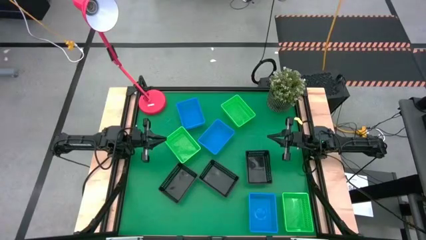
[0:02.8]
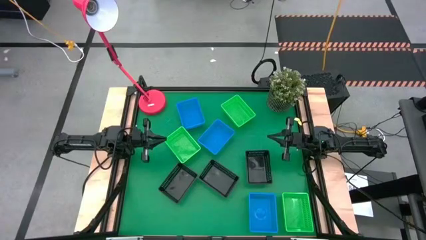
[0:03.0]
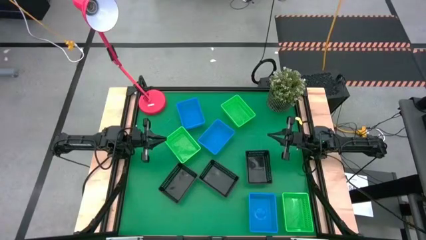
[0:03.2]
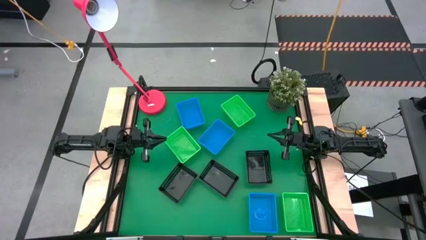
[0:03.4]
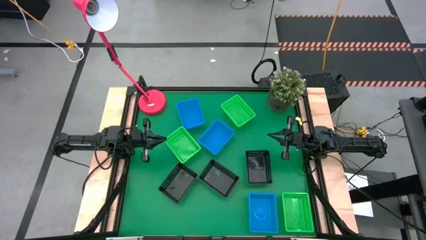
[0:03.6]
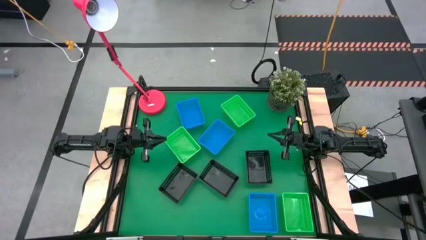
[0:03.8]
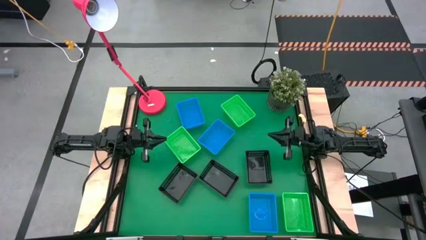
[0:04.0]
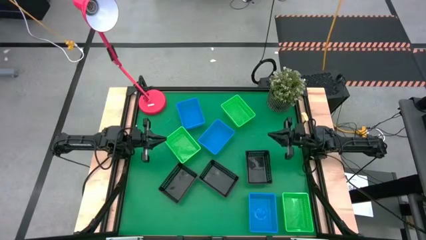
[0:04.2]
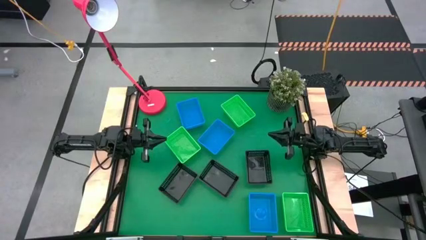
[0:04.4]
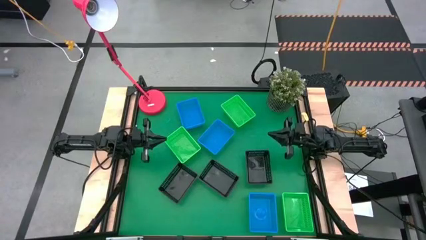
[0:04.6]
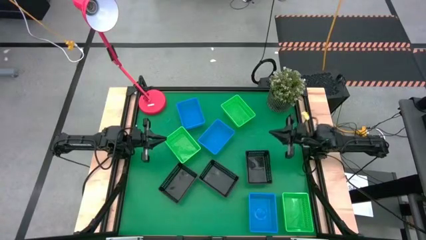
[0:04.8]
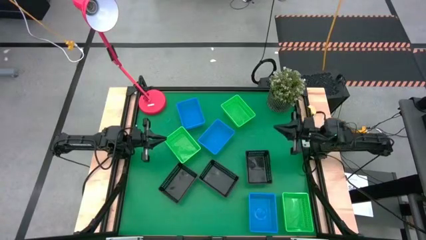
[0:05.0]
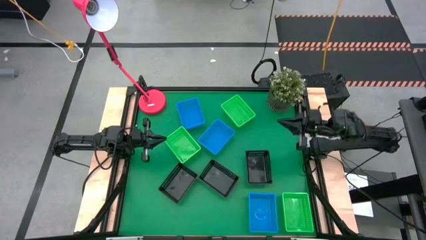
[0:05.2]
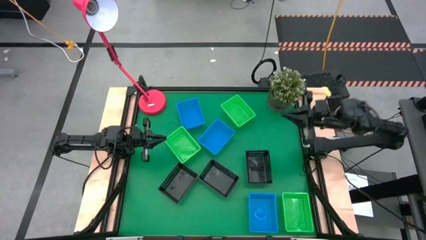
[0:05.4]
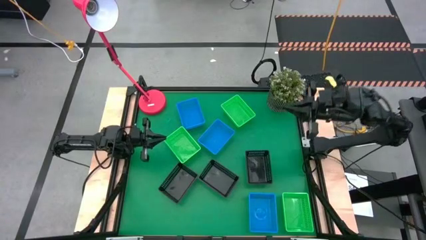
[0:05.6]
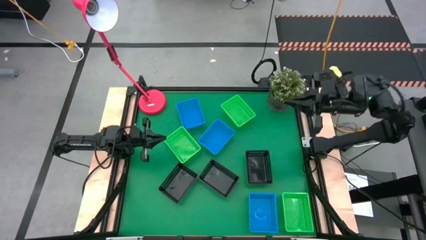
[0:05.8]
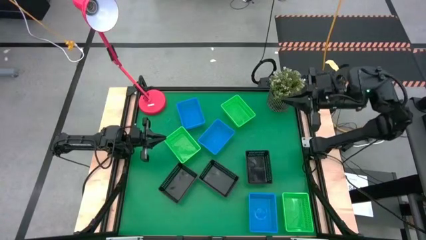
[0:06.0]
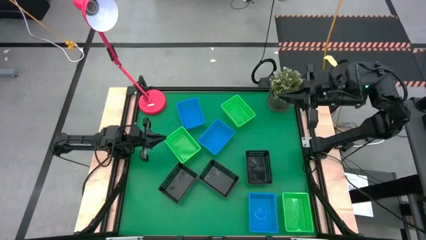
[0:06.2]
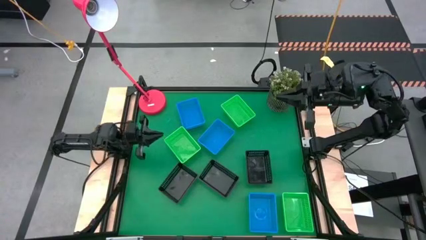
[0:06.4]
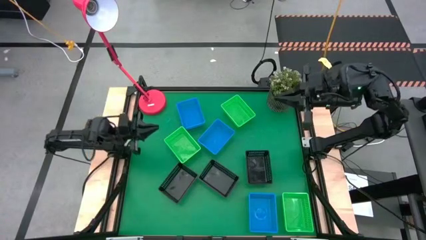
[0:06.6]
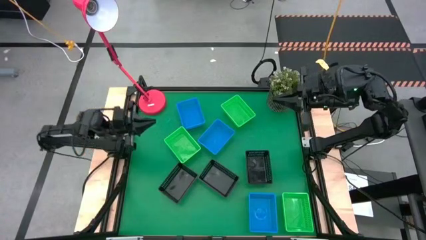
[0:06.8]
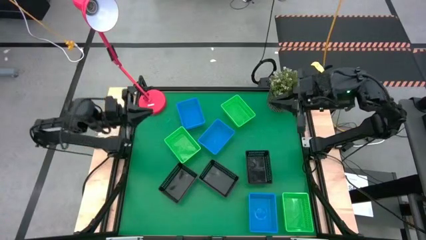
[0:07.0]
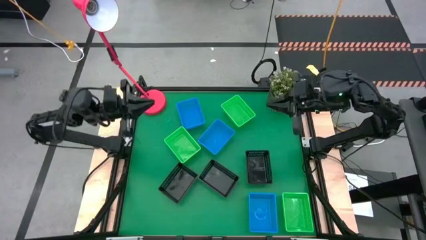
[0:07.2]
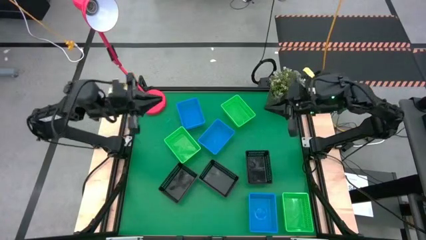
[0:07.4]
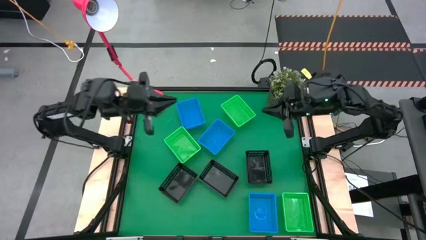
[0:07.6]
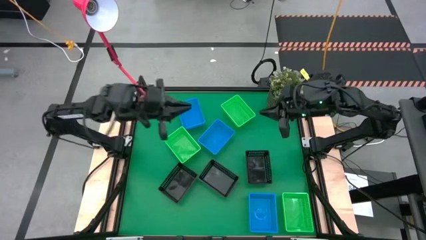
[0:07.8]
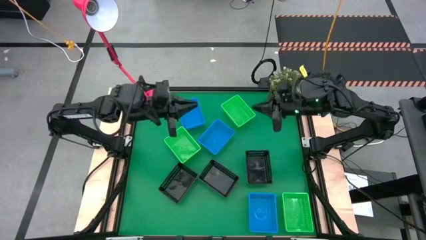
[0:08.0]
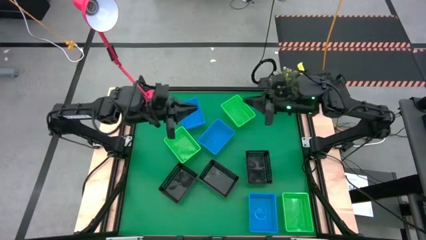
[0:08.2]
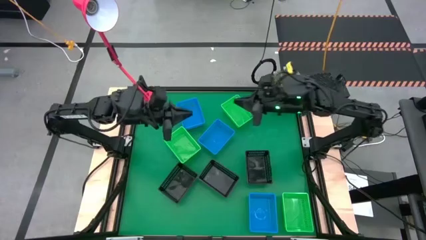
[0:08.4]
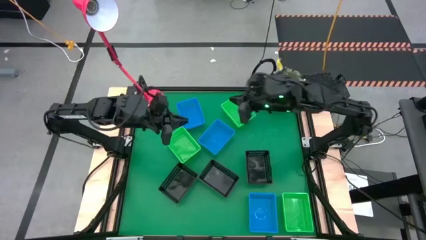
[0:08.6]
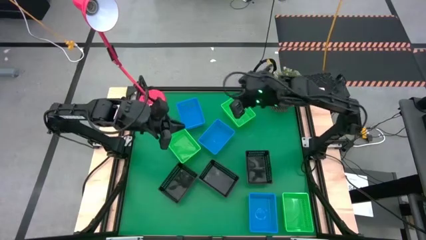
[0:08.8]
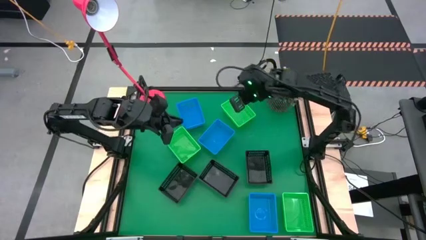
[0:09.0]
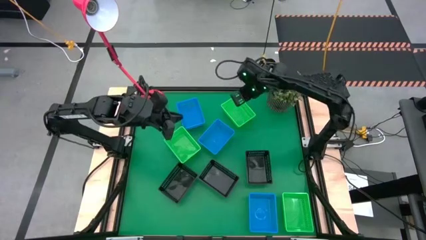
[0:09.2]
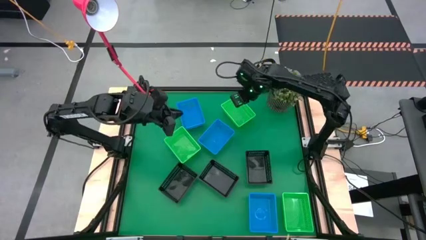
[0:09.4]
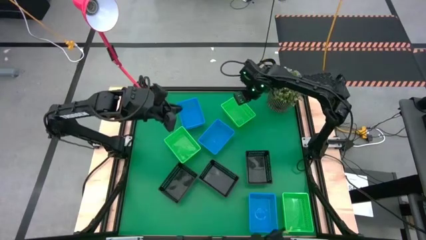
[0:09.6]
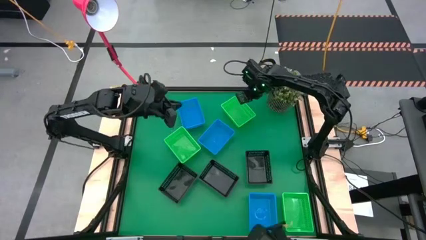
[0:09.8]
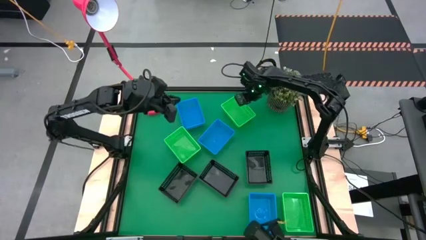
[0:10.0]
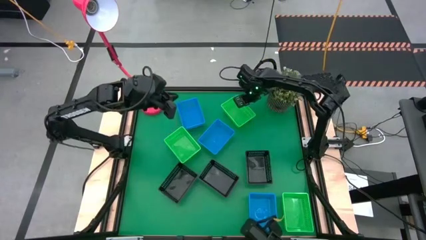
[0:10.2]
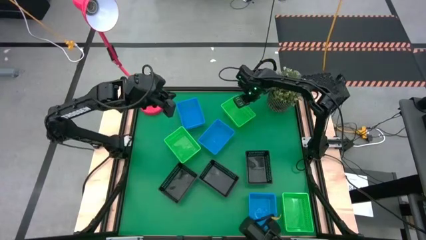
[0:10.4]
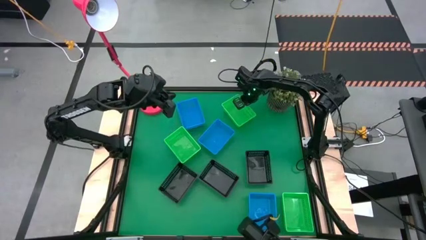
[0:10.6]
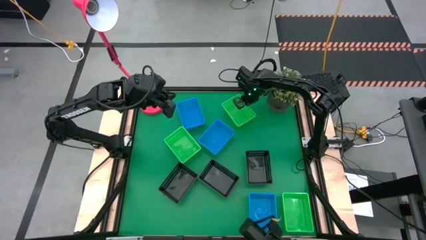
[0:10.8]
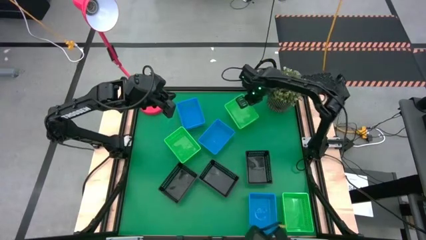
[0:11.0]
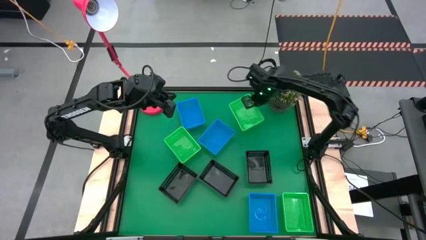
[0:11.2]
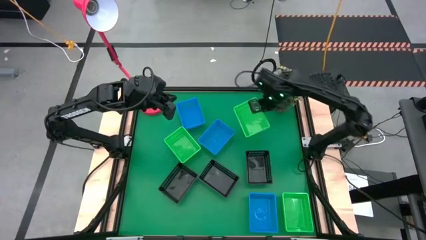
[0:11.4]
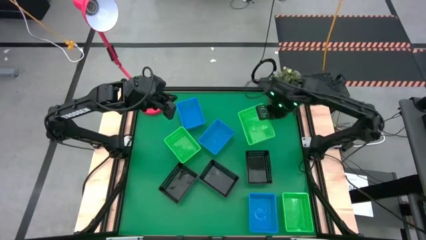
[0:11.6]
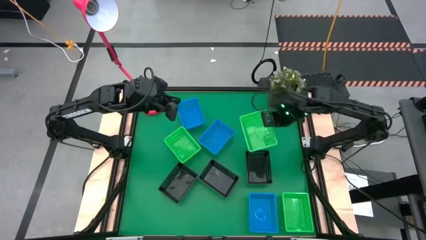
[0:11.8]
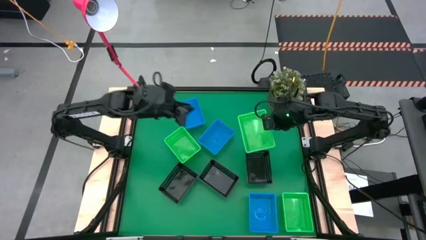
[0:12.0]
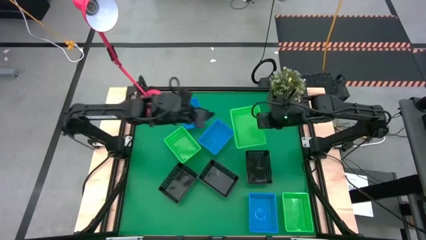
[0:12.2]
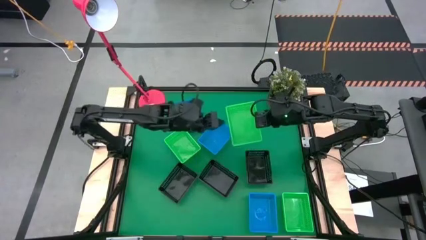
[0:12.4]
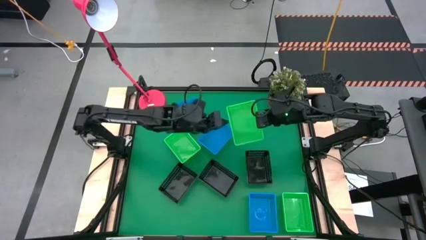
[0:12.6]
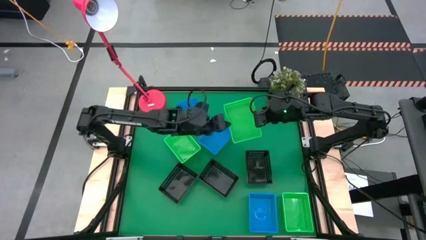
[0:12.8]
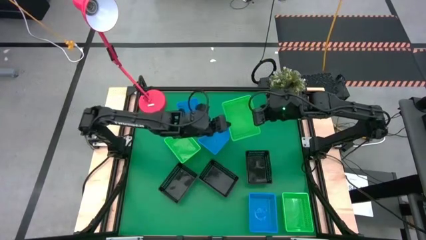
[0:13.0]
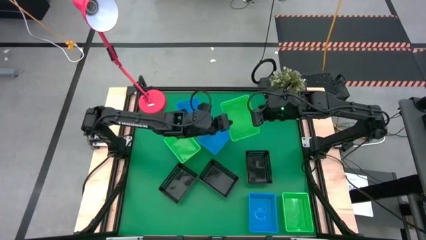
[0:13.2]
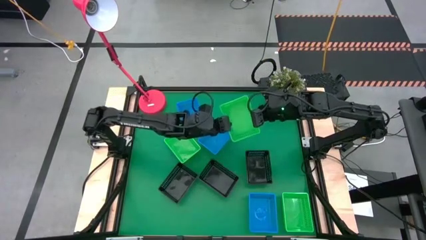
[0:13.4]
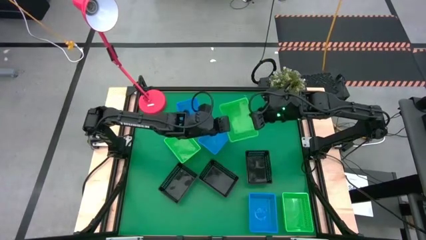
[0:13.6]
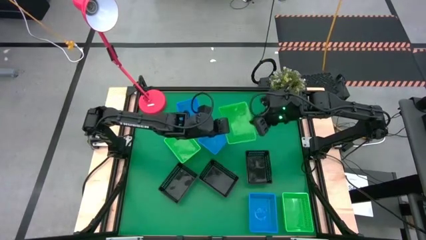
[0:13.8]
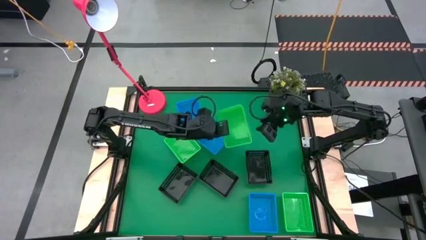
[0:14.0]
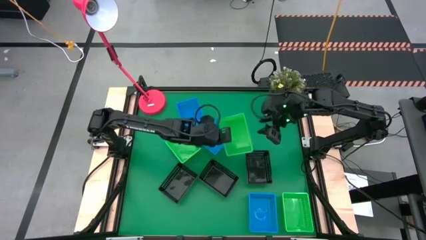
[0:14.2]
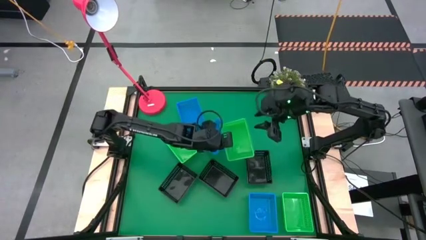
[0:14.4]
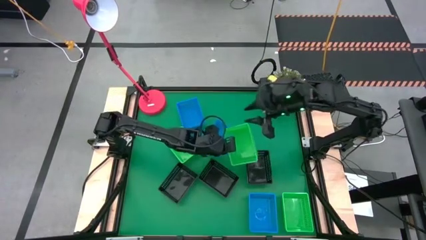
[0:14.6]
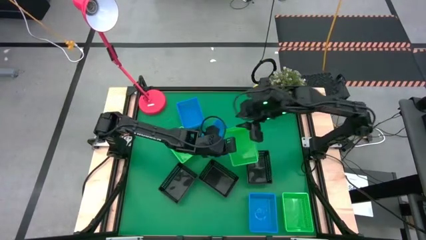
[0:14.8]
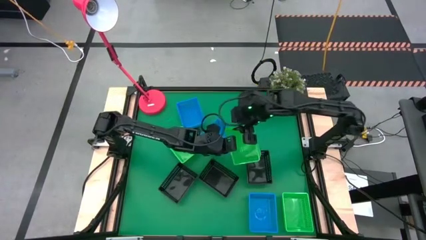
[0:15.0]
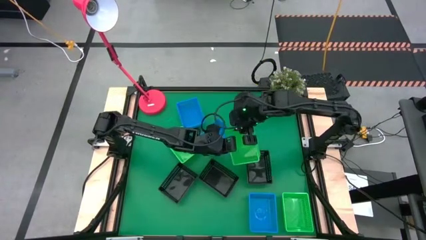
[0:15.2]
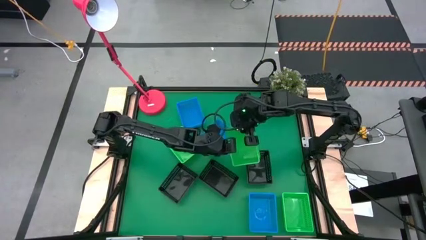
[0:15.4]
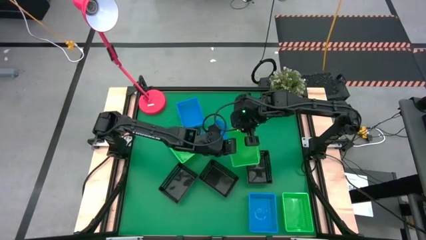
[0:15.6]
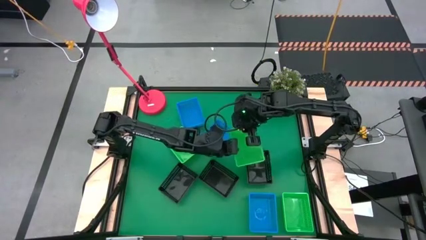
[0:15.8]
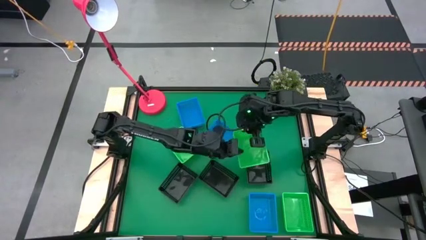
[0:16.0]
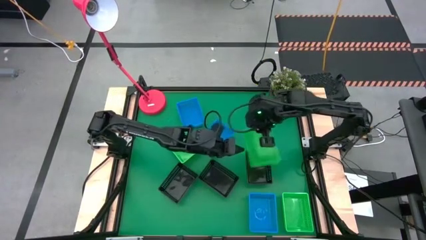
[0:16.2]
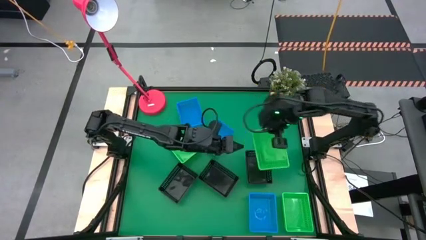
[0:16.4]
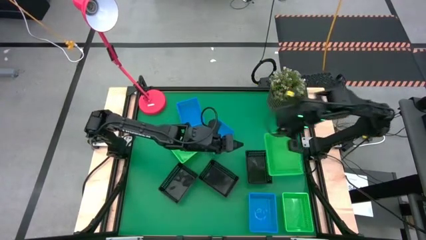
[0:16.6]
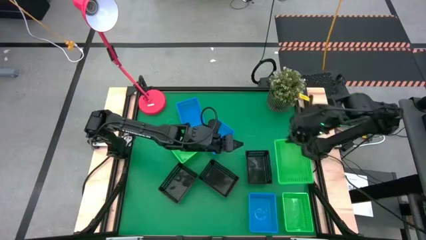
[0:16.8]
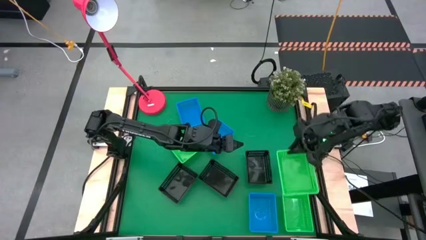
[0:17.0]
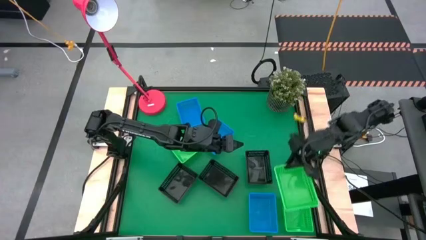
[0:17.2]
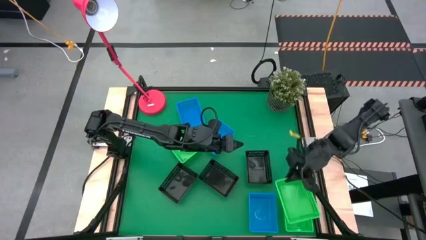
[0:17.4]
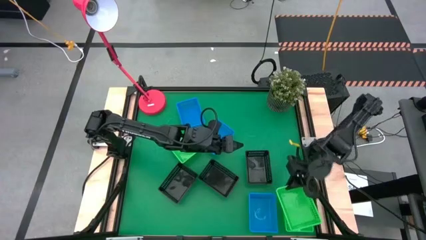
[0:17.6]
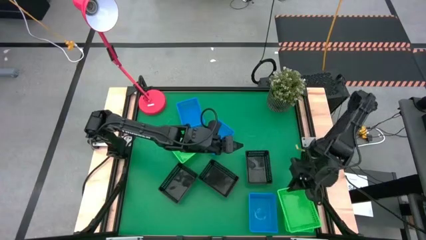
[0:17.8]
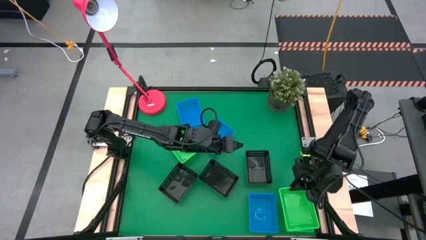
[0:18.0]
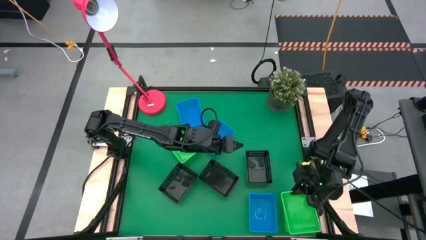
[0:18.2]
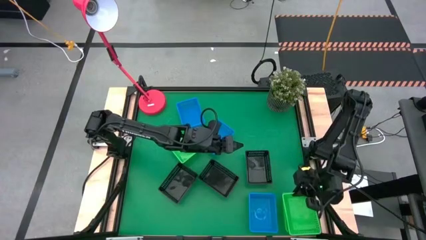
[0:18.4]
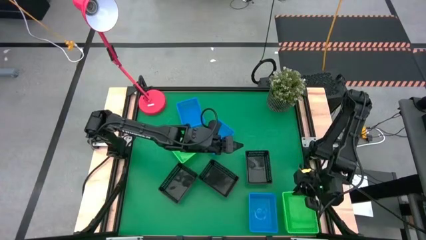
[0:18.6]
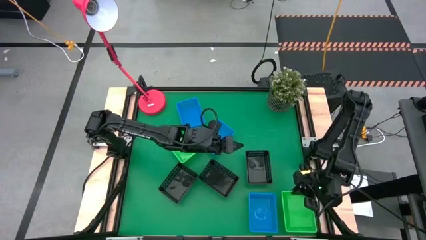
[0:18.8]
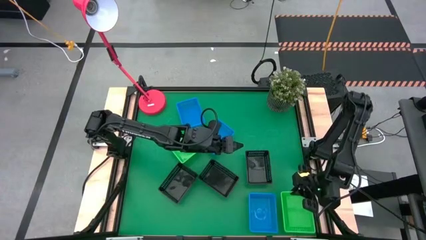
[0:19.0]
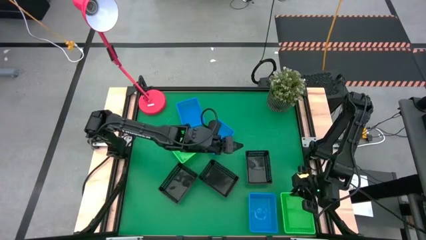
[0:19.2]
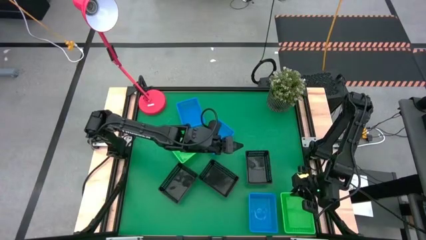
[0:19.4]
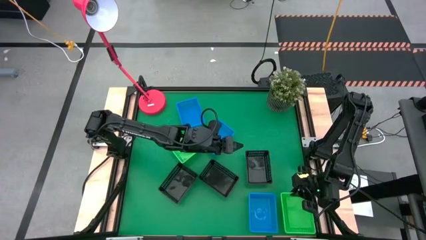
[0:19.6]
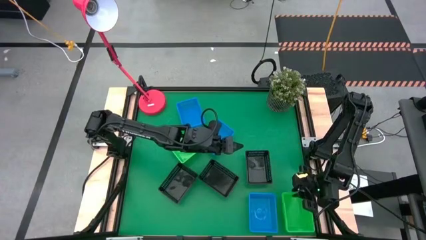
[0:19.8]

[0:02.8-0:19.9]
Stack the top green bin on the bottom green bin
